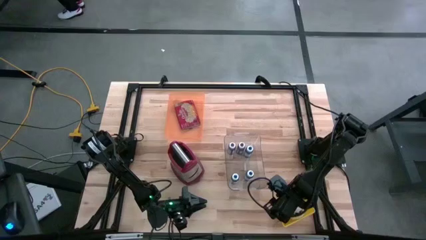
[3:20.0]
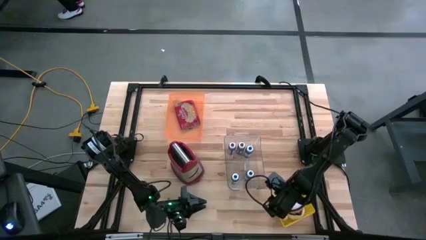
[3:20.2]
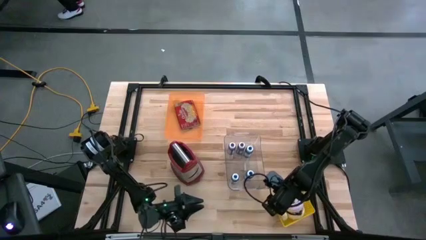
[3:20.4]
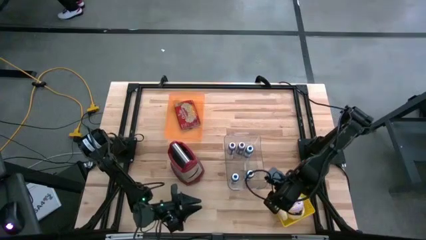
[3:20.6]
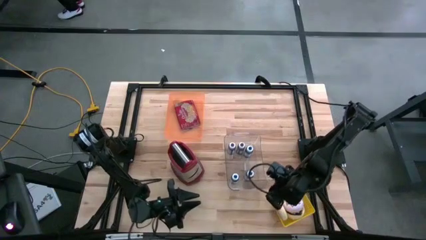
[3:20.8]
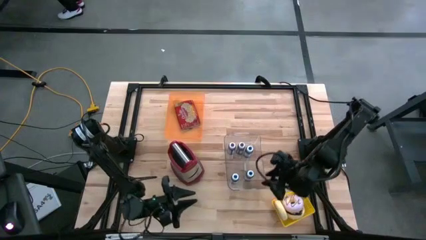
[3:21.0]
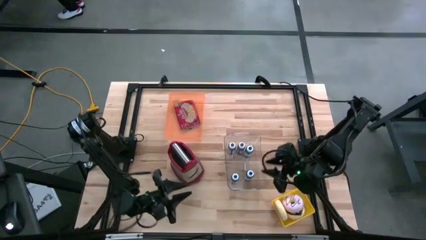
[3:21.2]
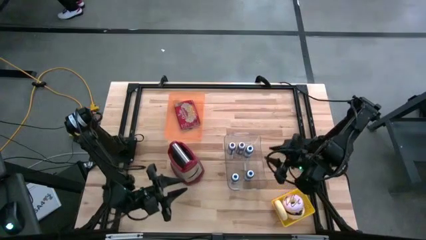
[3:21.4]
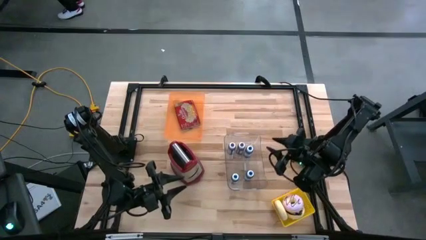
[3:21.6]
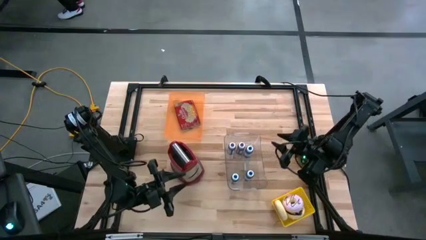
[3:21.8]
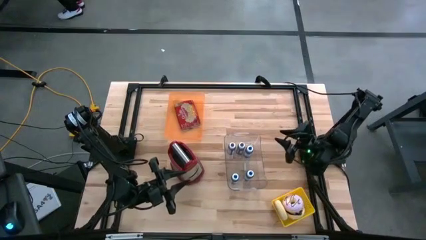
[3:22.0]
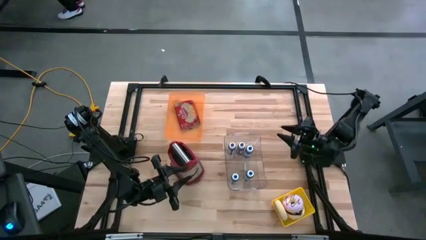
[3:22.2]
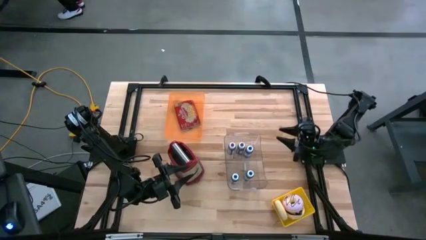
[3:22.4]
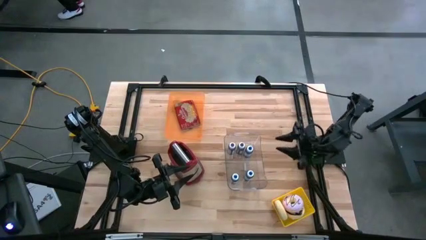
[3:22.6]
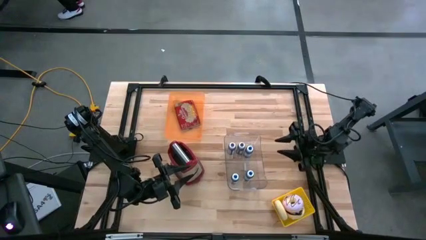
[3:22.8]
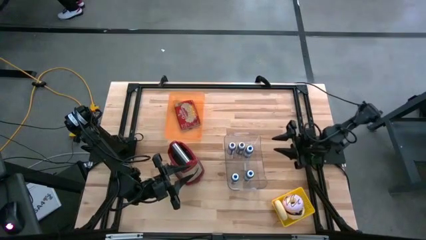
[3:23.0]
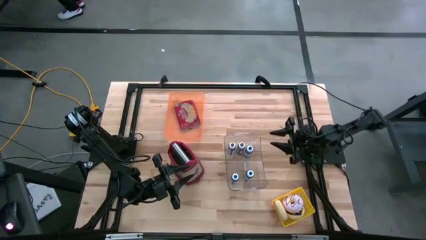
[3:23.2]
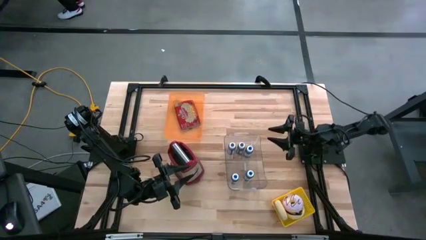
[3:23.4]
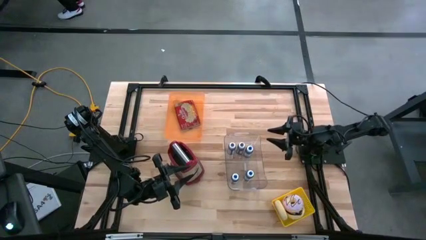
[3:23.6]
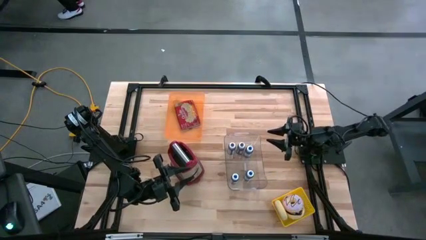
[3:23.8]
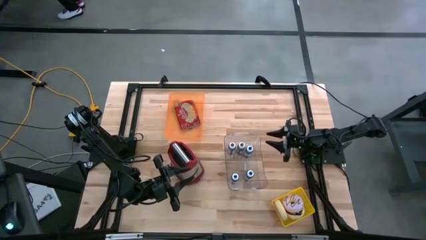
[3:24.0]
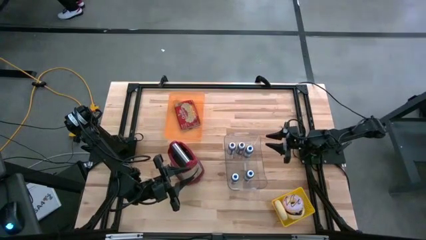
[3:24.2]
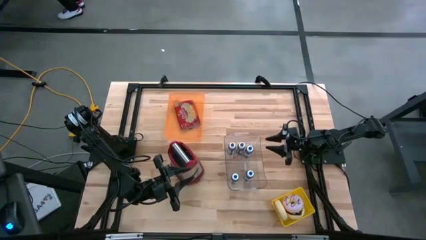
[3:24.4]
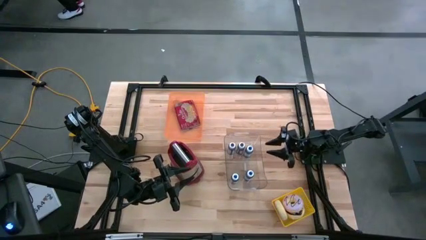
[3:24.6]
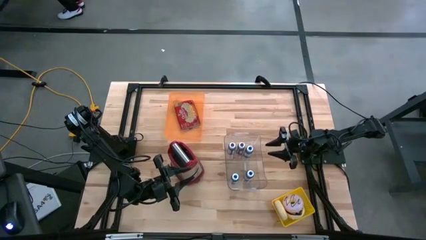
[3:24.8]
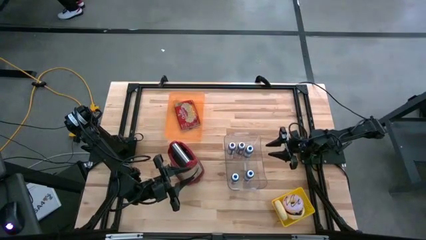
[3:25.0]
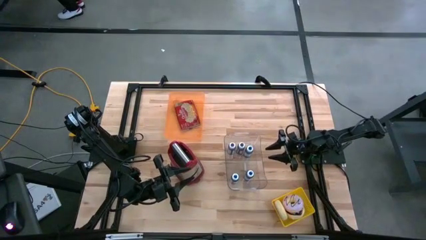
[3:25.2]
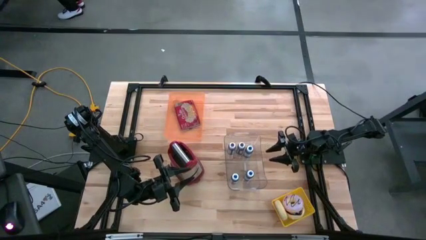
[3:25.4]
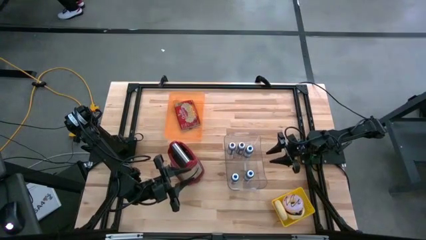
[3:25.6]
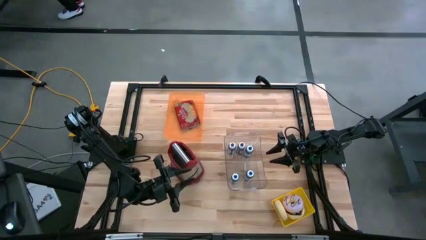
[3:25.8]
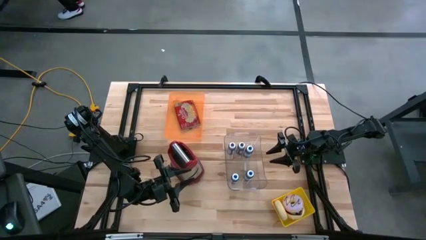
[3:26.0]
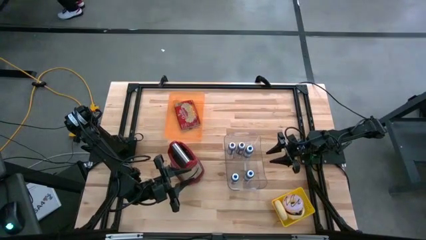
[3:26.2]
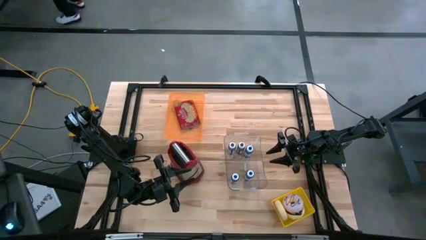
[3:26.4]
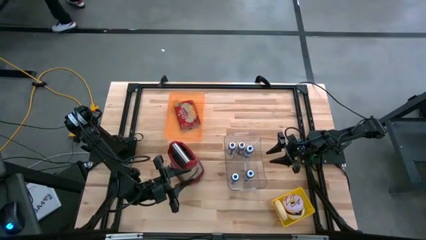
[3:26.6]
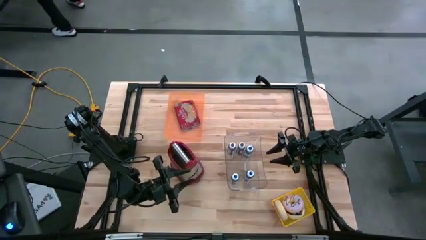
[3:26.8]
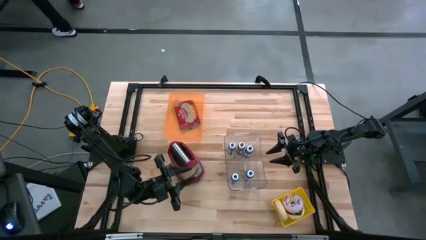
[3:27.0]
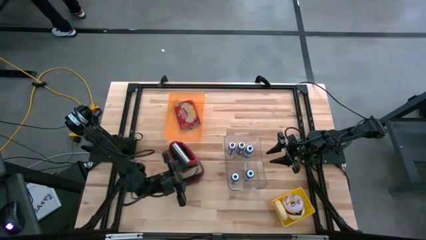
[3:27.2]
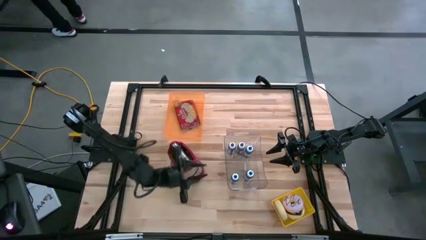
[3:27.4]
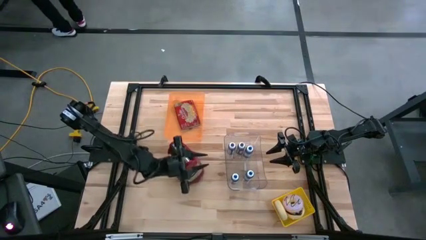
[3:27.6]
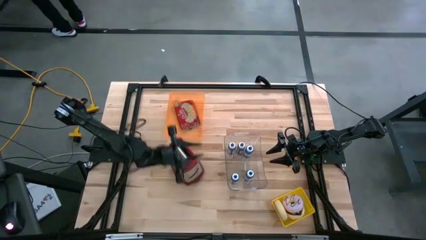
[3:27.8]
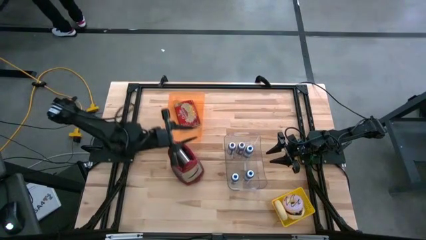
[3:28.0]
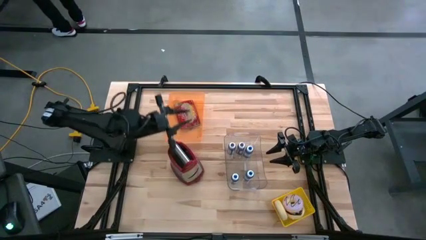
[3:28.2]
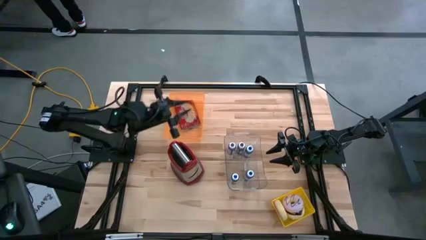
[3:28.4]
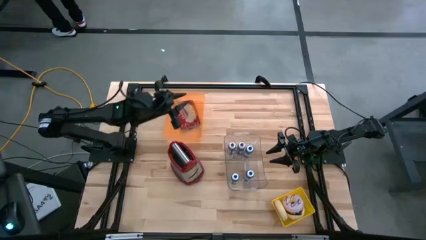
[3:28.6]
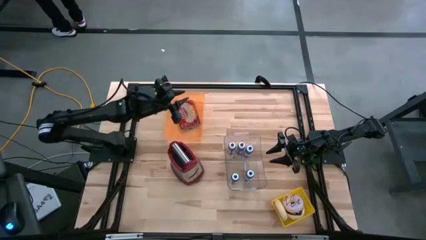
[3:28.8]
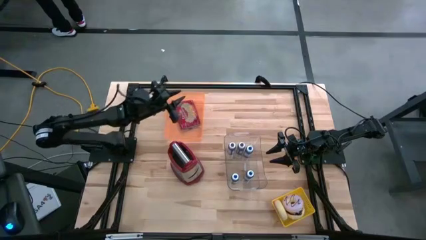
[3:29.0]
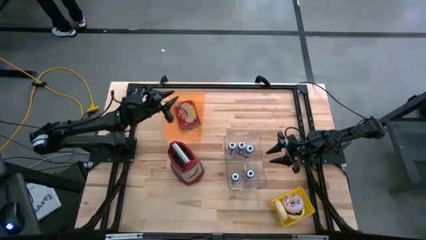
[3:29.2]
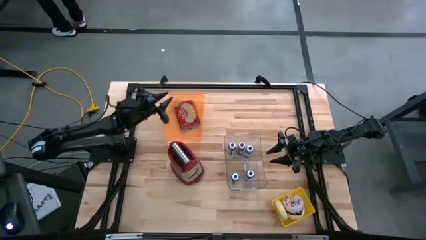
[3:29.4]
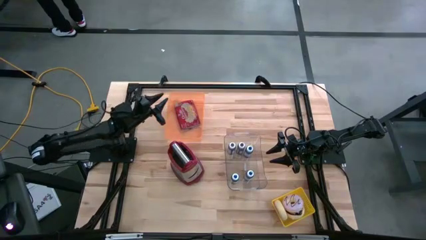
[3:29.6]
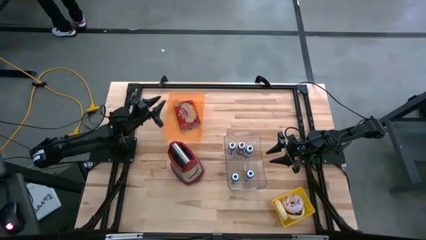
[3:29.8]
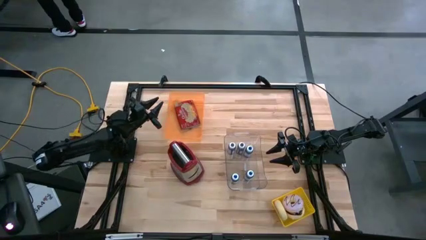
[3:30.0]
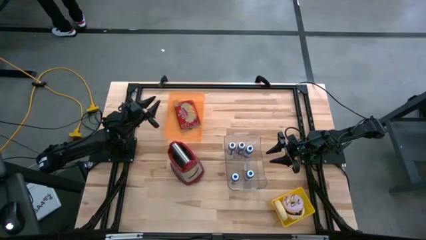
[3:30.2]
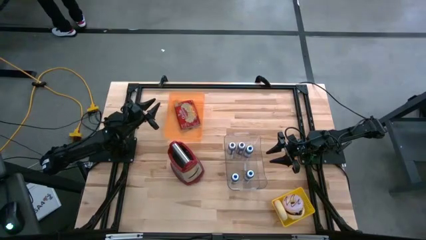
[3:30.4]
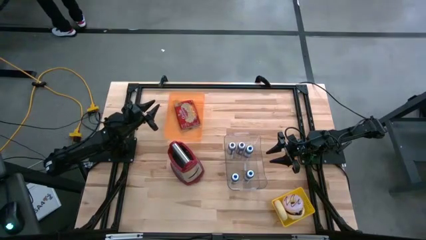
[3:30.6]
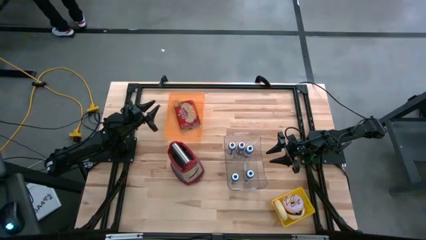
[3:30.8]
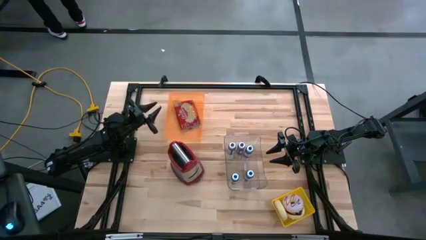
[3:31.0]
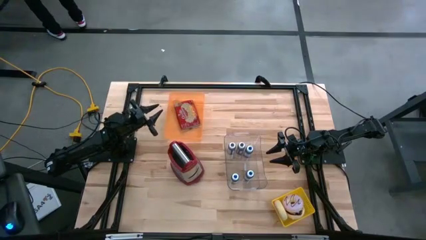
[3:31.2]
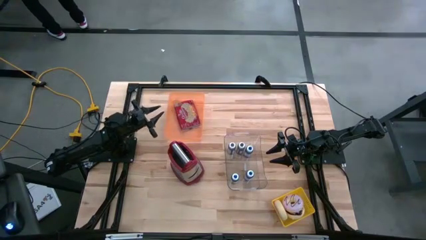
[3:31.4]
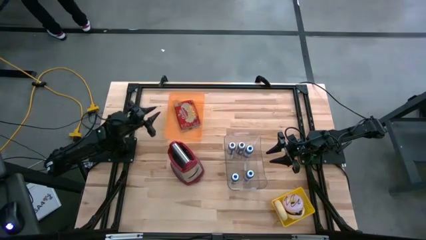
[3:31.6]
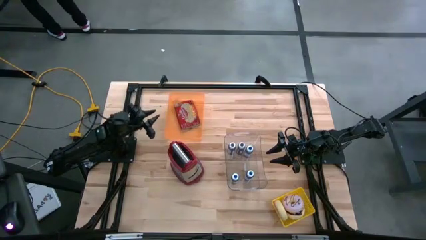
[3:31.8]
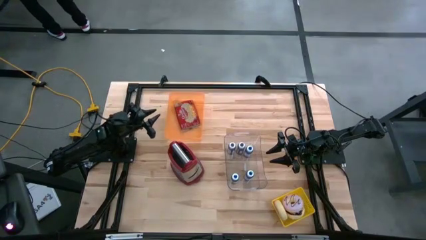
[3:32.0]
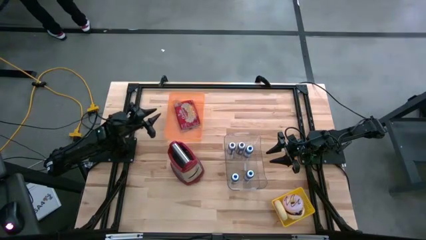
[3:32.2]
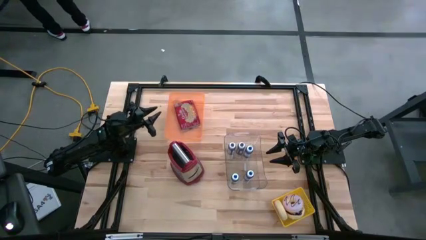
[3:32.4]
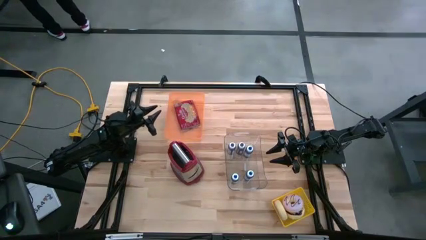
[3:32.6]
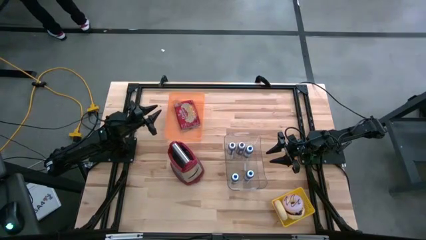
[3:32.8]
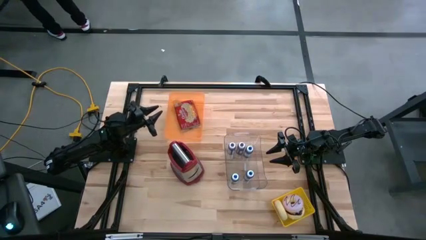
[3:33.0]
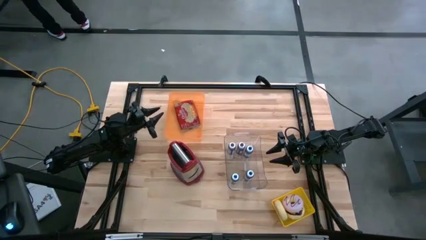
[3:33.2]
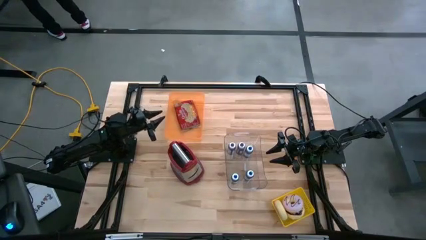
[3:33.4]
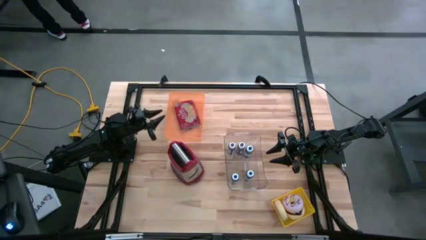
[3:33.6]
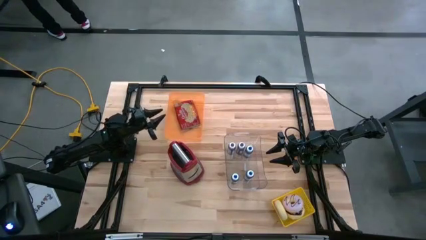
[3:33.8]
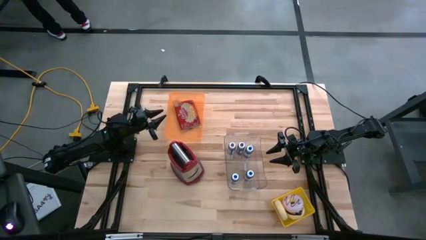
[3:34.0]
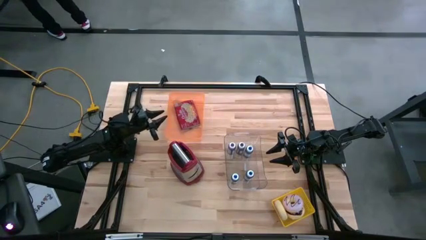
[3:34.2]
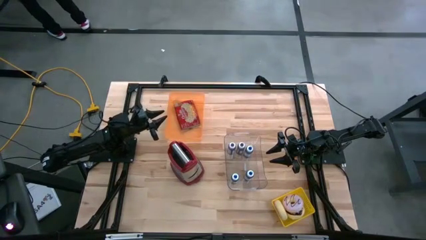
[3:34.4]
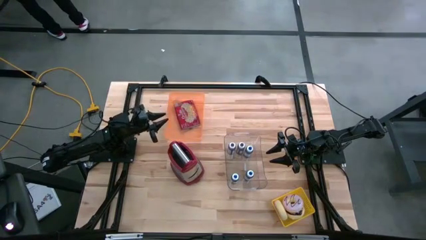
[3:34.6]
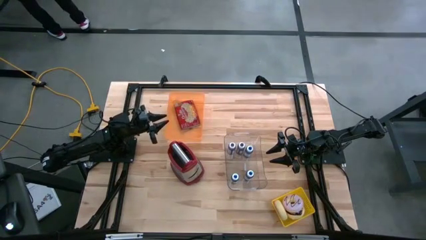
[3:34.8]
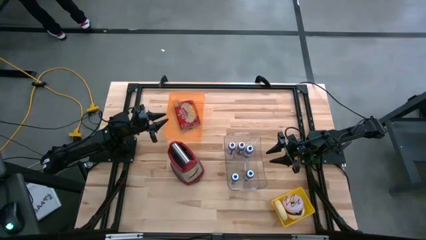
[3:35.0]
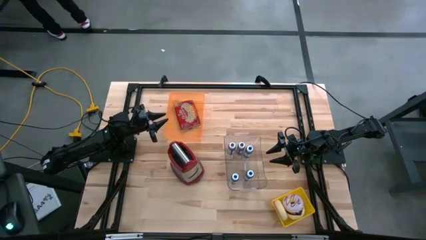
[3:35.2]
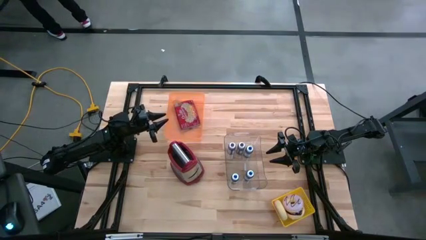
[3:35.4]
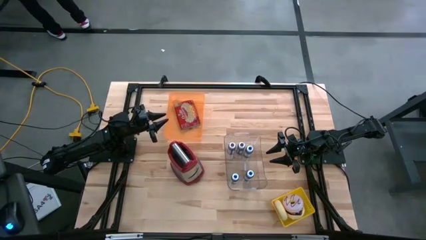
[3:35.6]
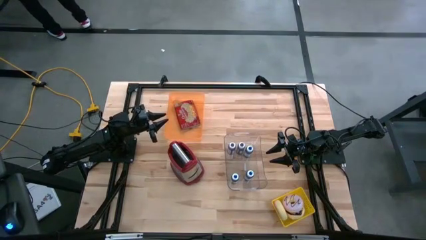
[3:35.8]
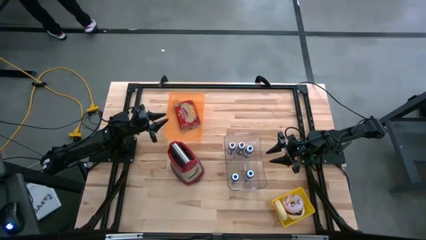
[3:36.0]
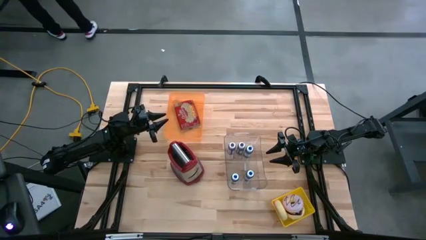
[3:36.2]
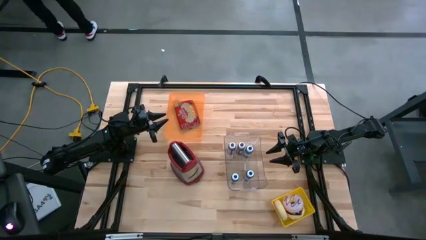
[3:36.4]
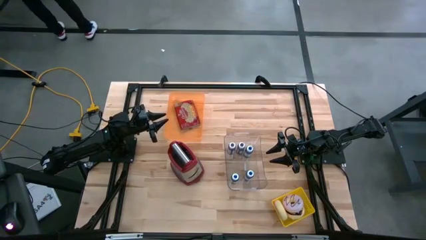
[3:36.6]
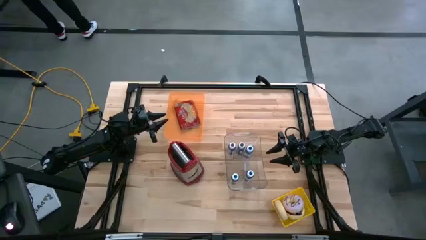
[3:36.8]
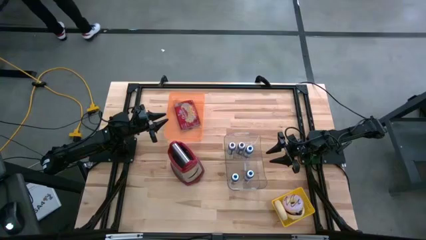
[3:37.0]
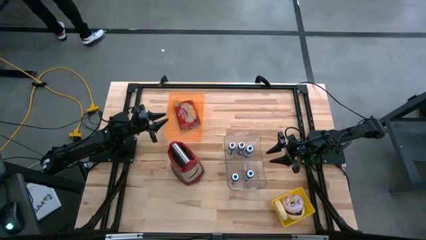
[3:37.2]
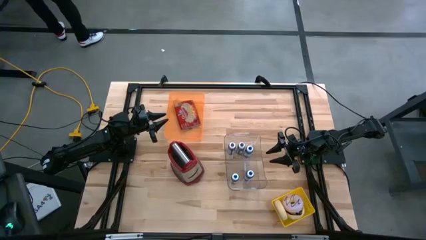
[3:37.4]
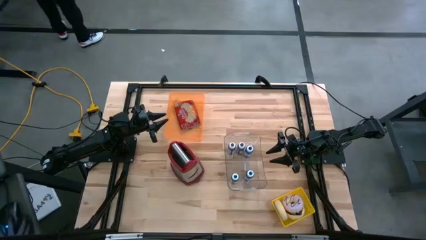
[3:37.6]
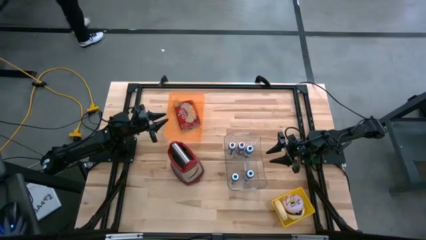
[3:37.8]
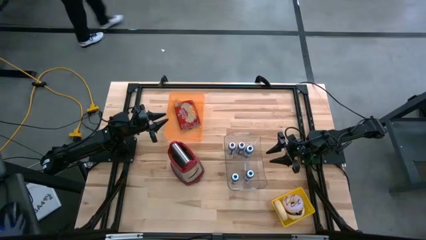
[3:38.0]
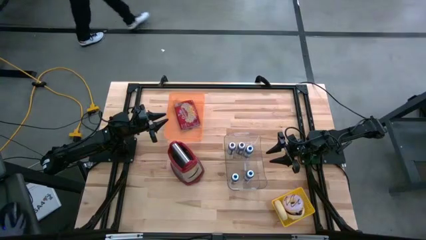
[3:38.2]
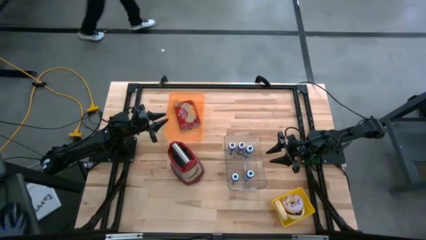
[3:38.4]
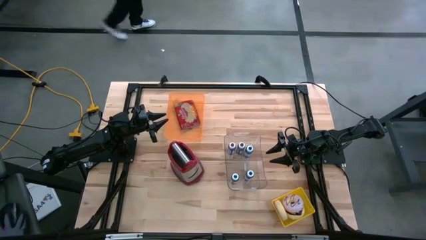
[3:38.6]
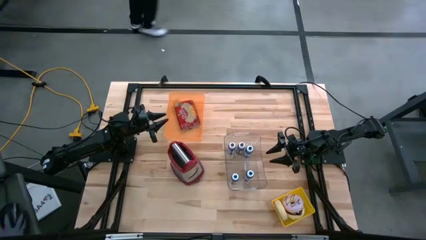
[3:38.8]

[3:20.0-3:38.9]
Task: Pick & Place Food Item
Return to Home Position
